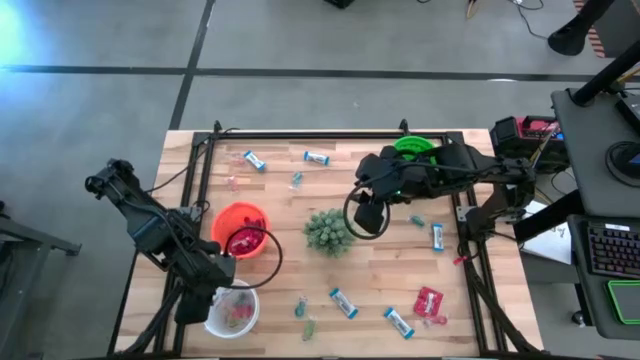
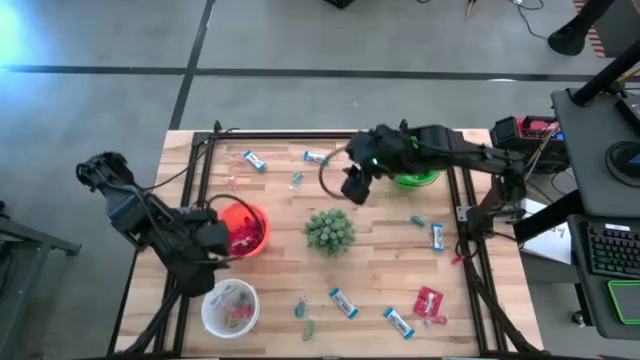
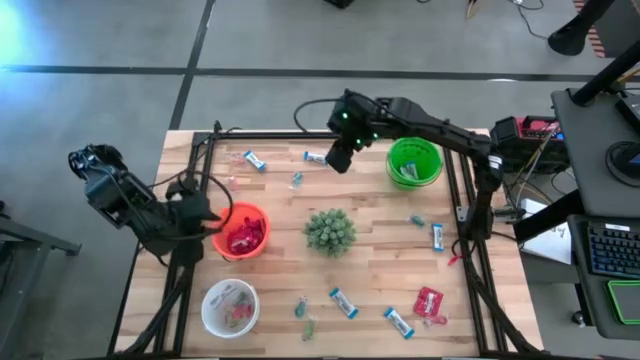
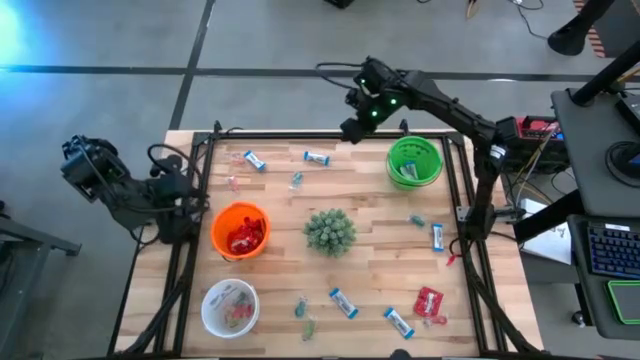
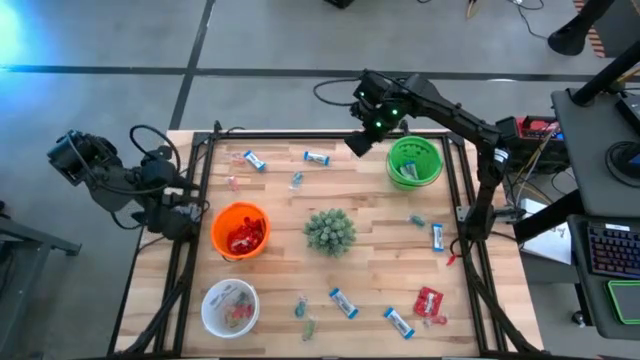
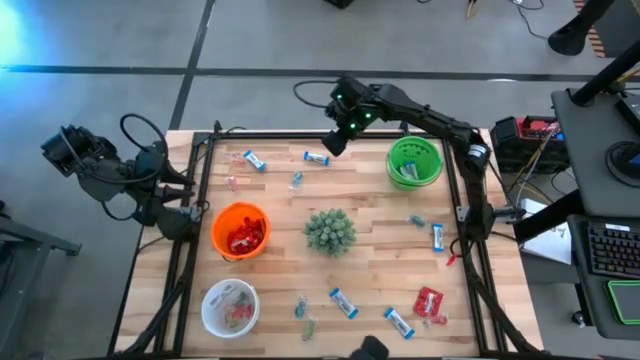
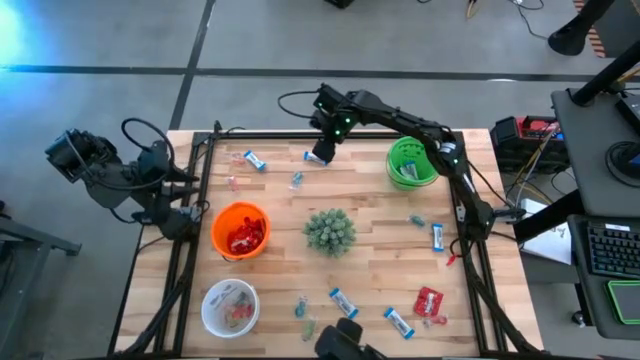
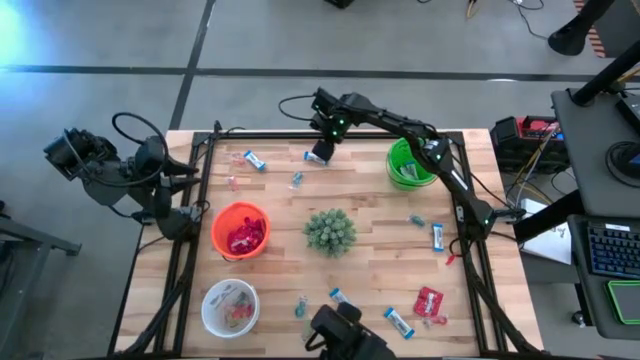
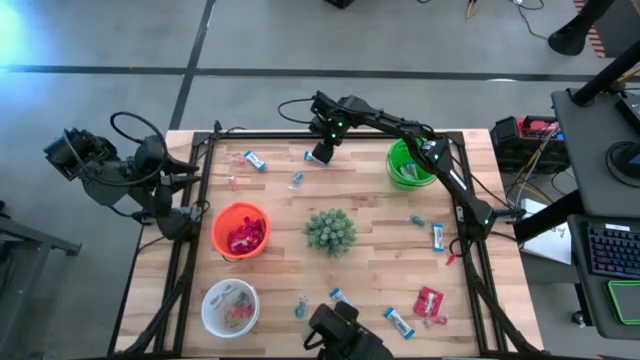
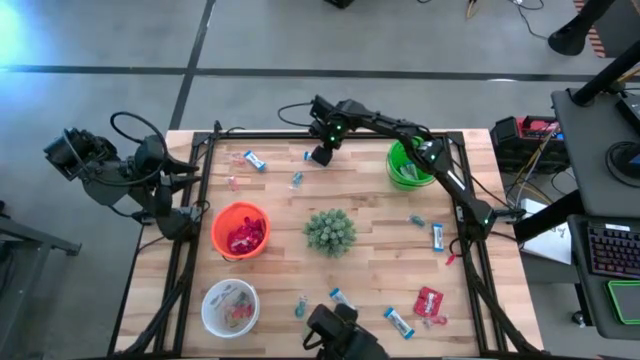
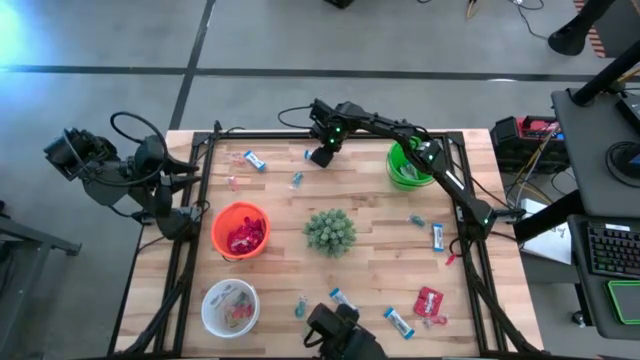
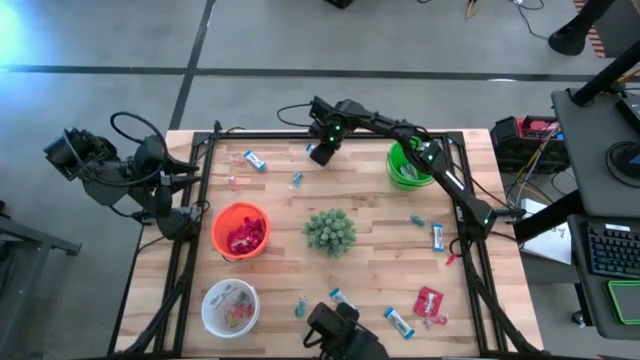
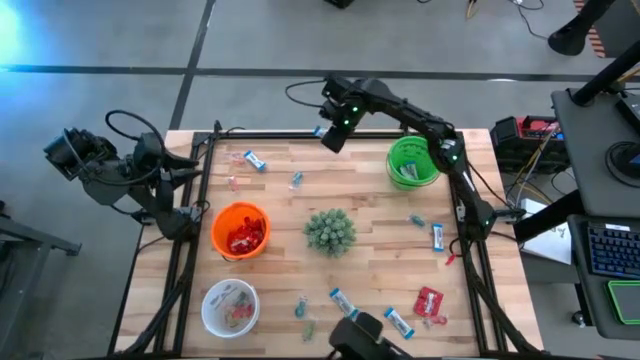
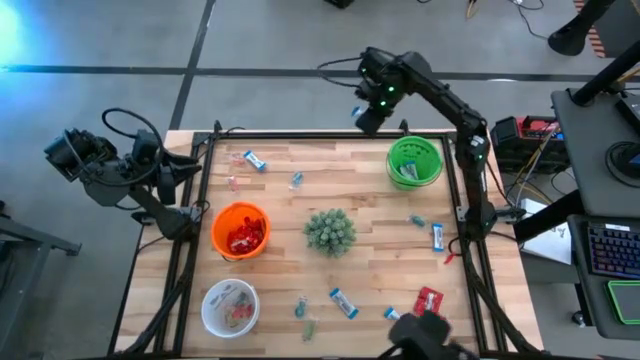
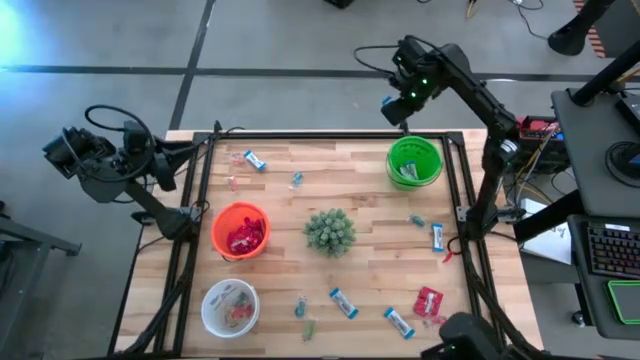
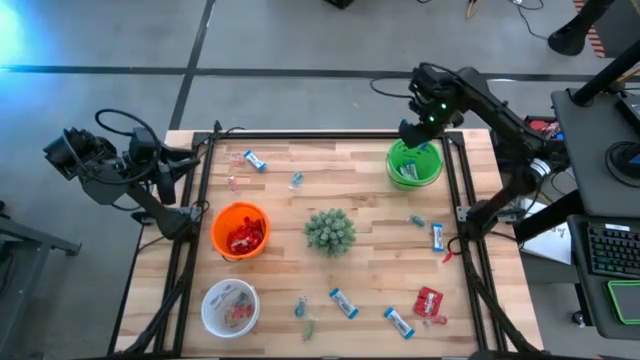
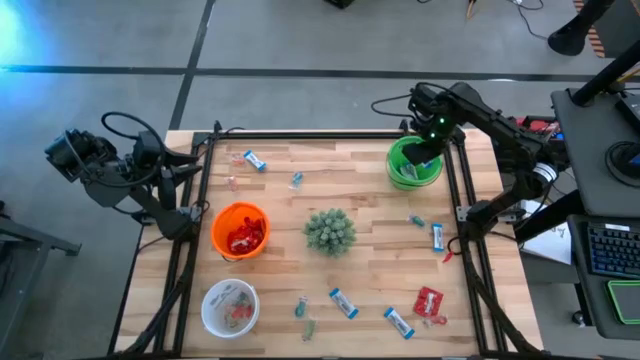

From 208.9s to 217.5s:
Task: Sort candy
Put the white chocolate into the green bucket

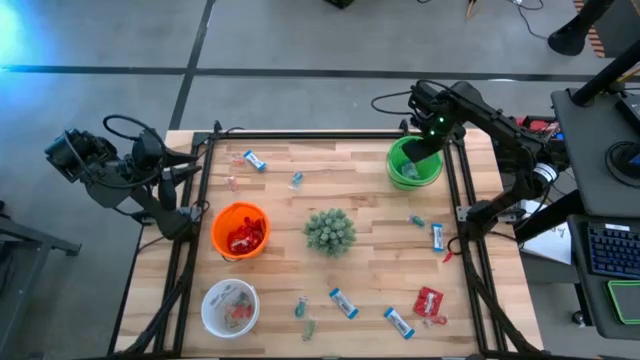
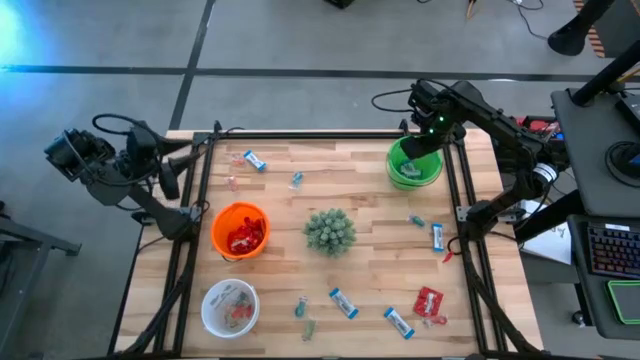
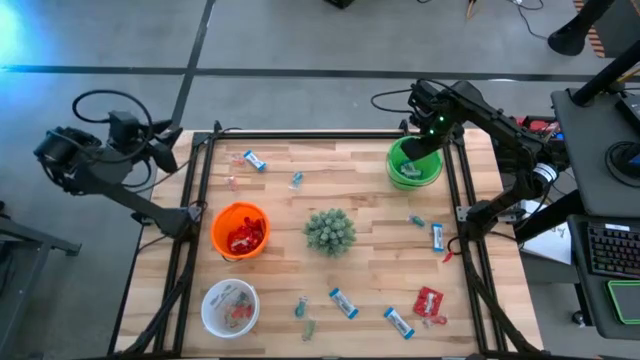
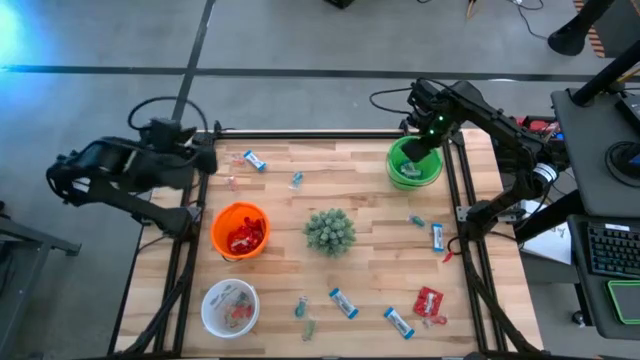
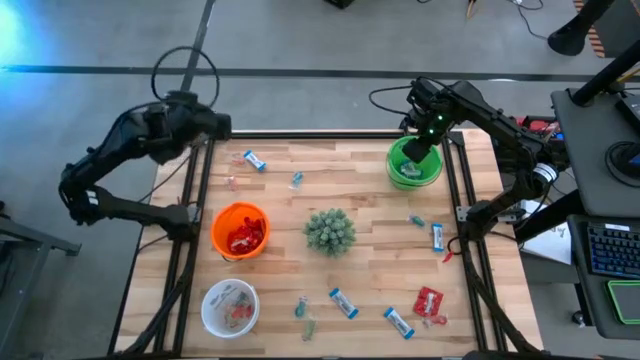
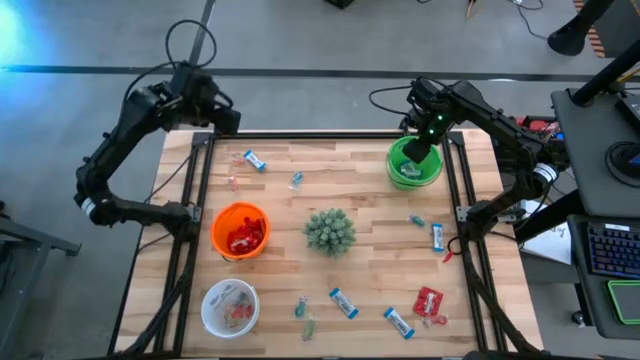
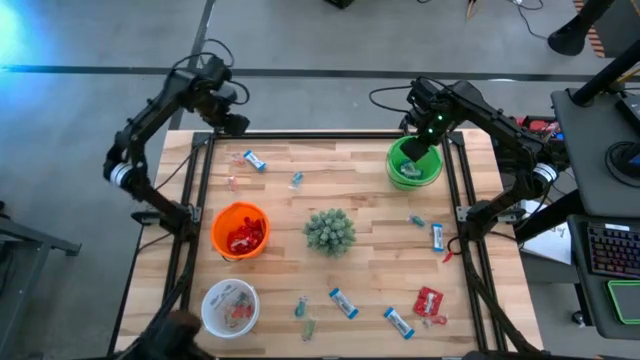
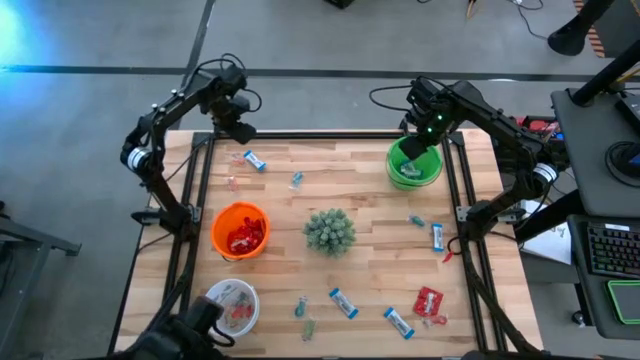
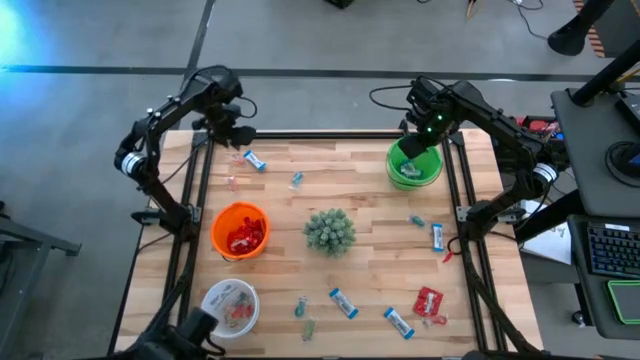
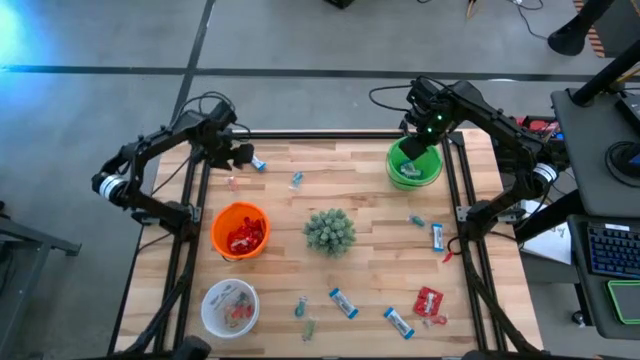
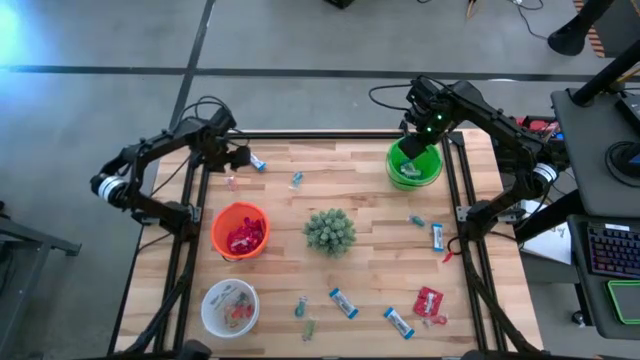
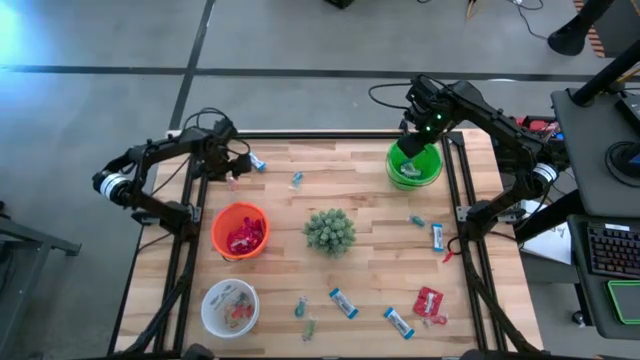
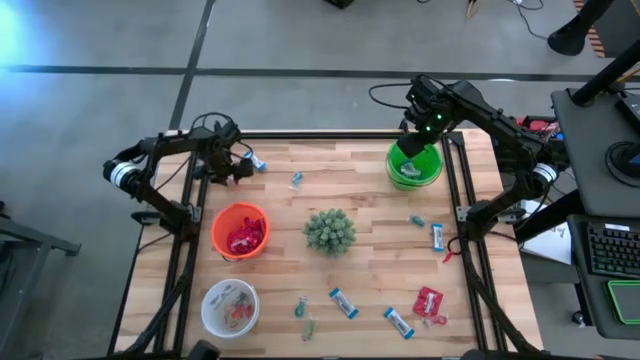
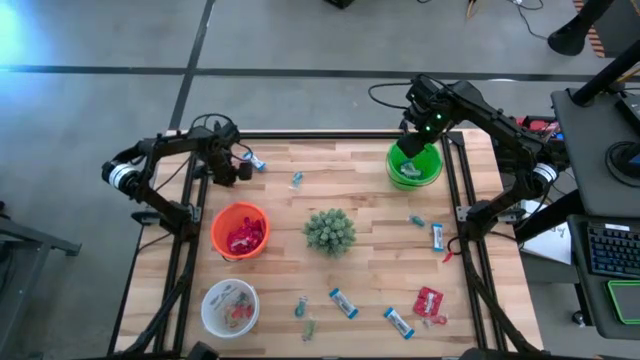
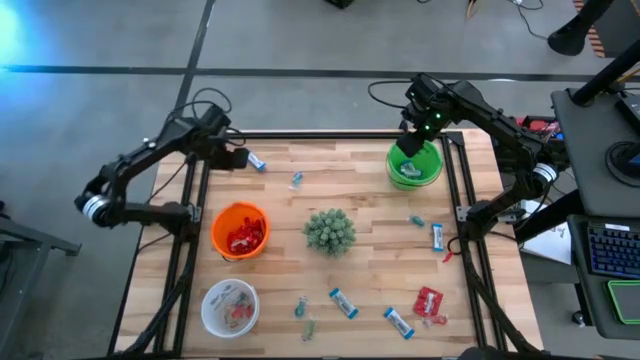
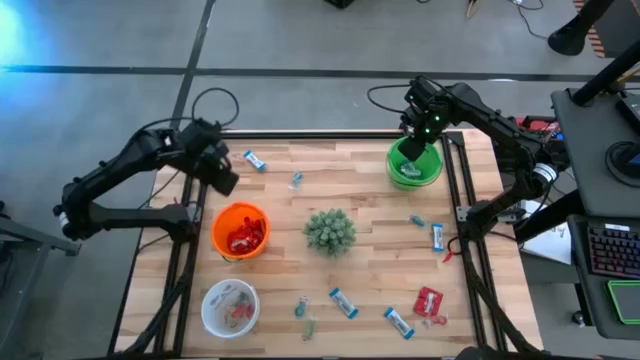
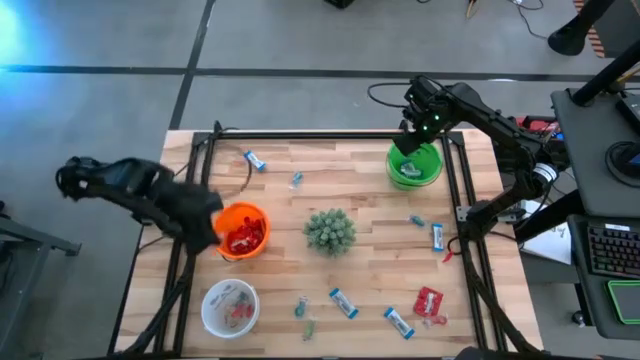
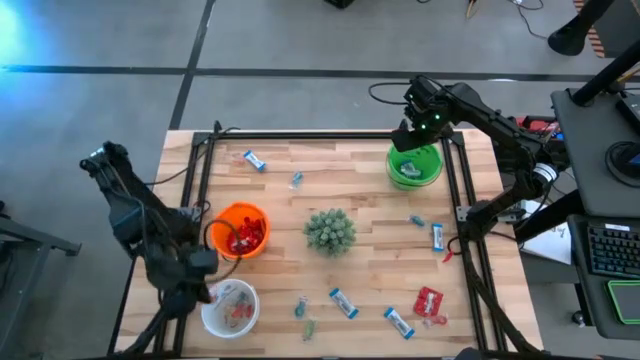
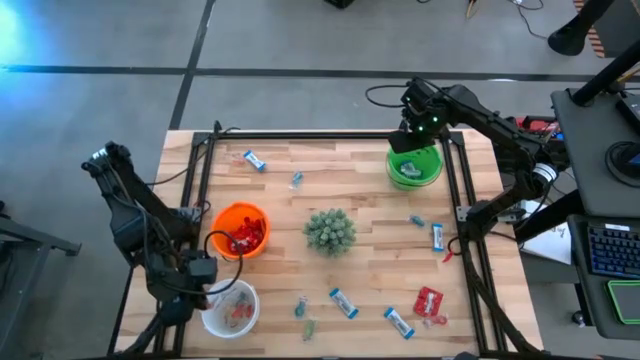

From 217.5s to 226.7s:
Put the orange gummy into the white bucket

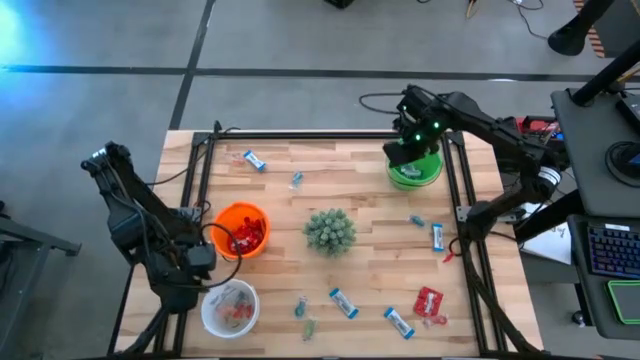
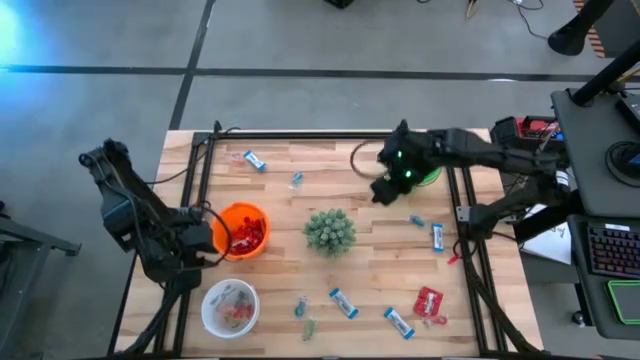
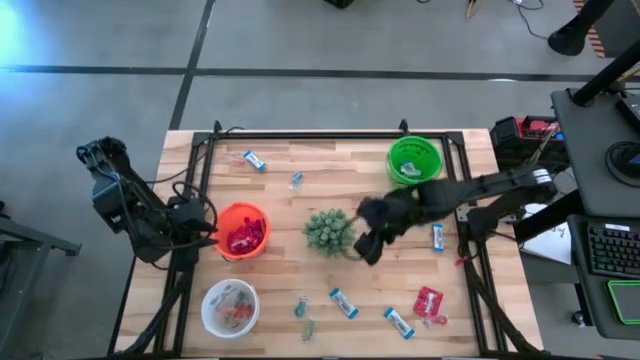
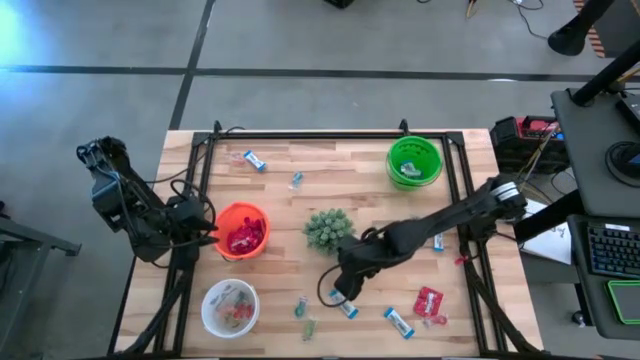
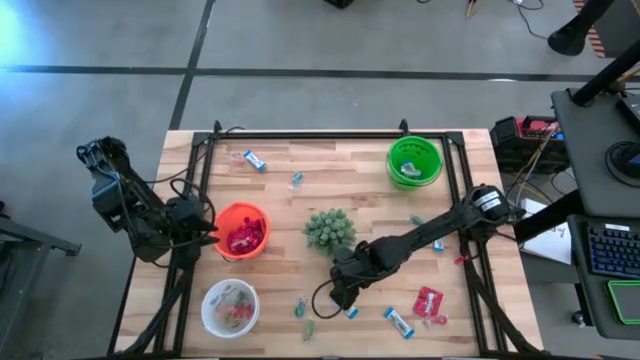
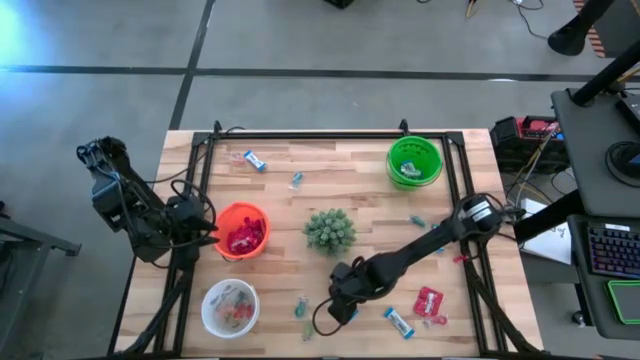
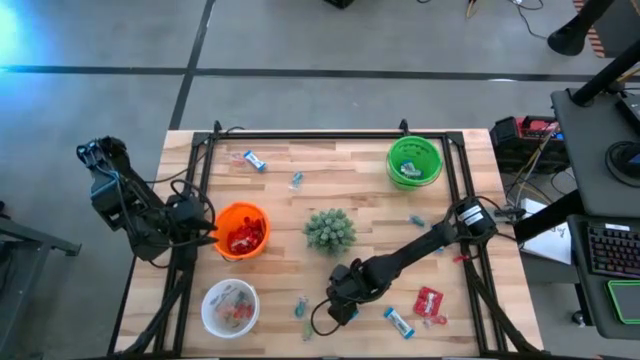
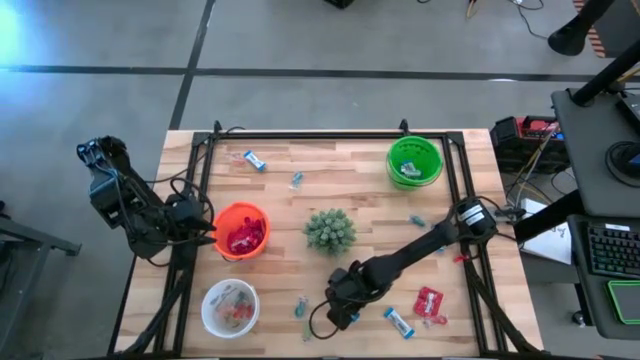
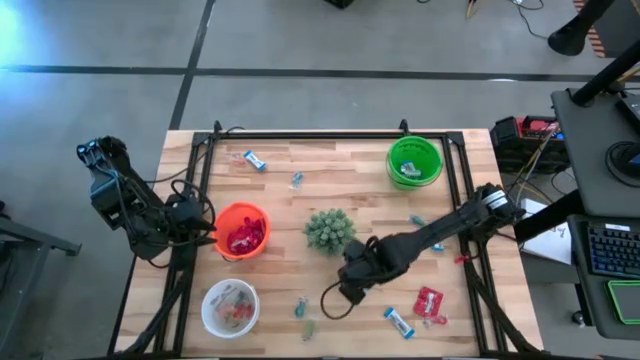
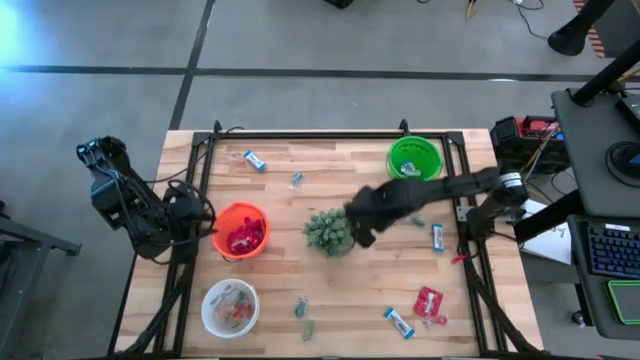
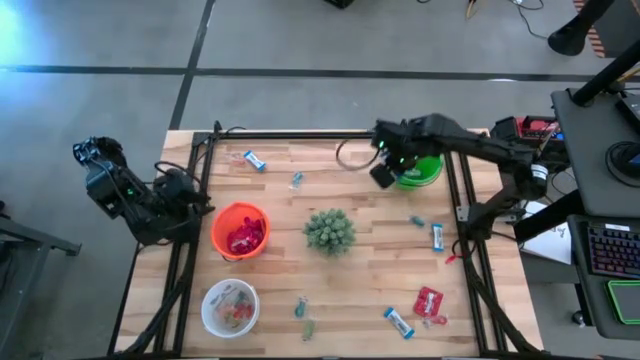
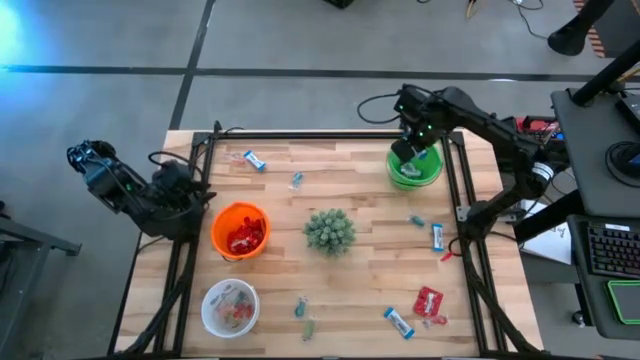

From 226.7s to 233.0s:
Put the white chocolate into the green bucket
